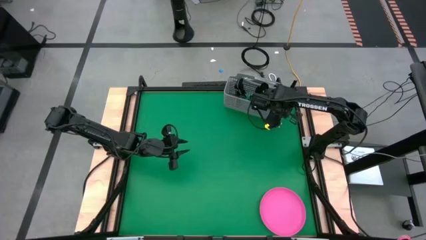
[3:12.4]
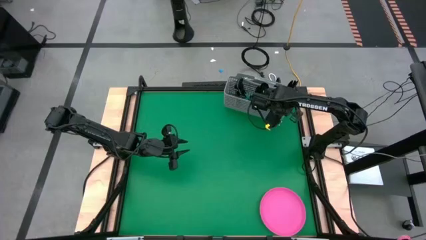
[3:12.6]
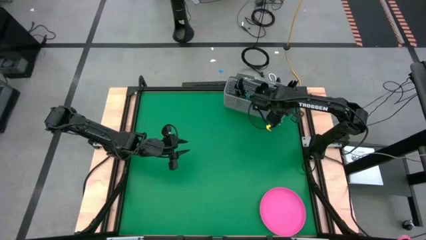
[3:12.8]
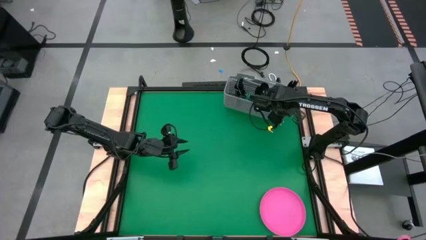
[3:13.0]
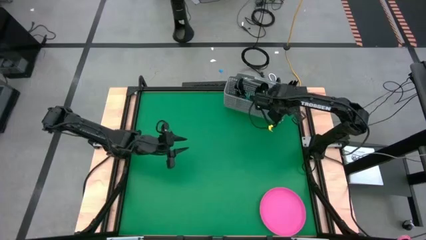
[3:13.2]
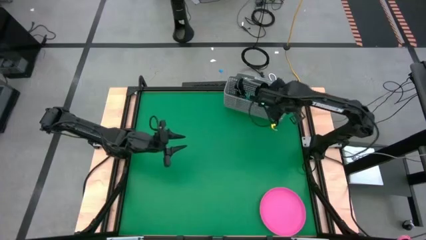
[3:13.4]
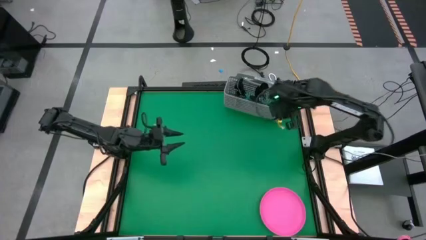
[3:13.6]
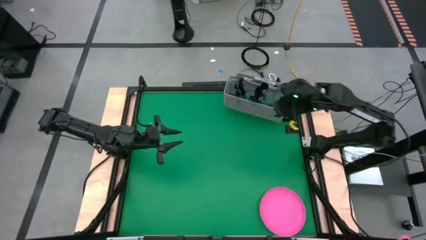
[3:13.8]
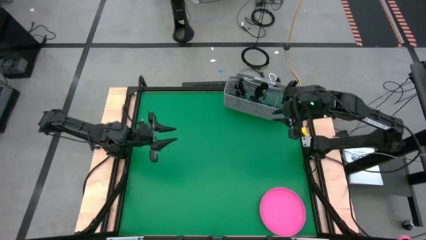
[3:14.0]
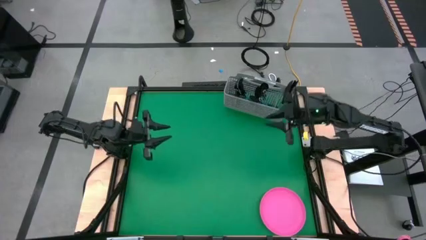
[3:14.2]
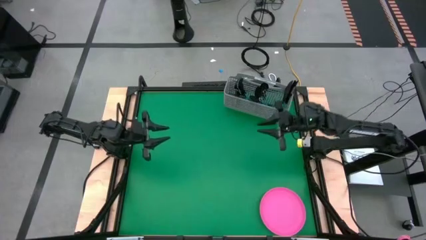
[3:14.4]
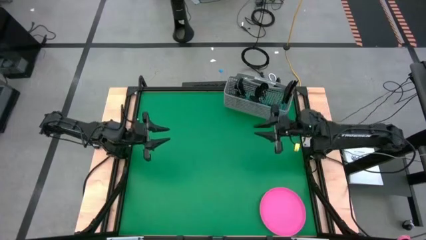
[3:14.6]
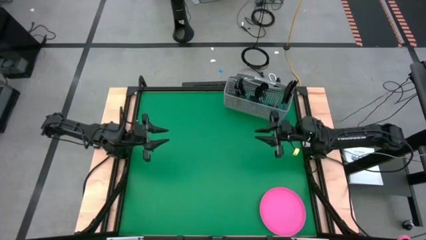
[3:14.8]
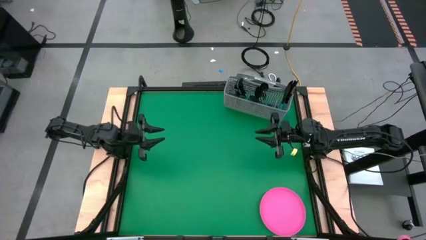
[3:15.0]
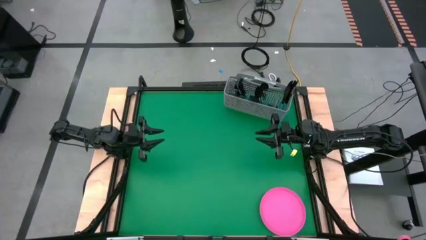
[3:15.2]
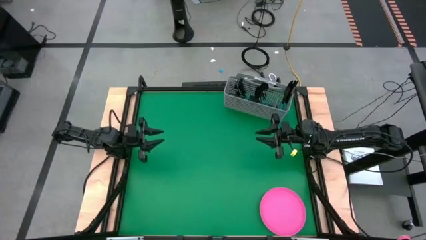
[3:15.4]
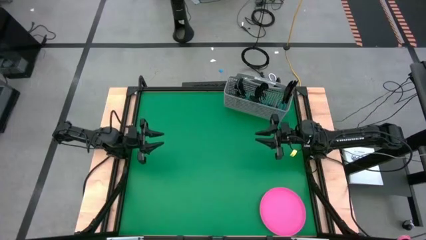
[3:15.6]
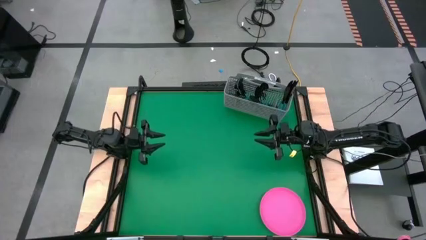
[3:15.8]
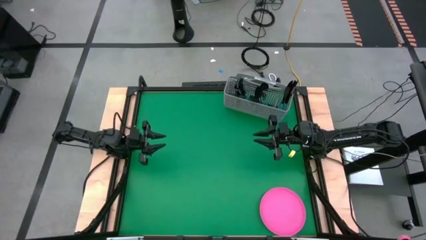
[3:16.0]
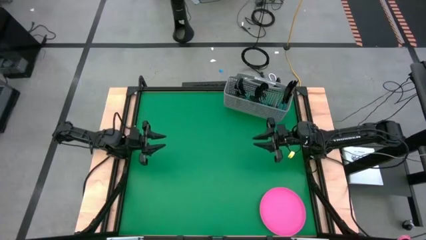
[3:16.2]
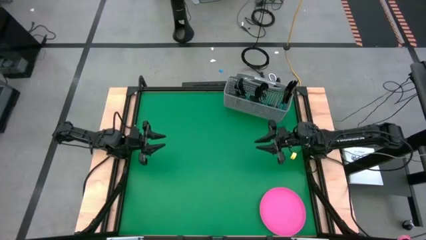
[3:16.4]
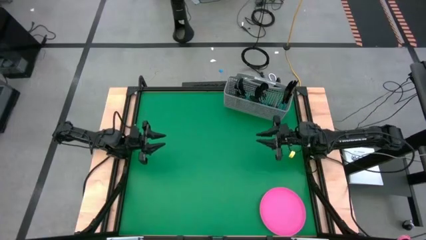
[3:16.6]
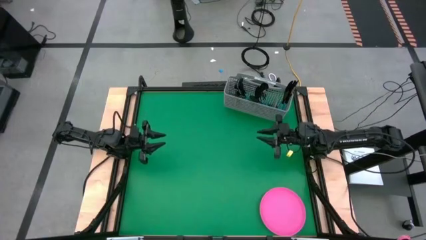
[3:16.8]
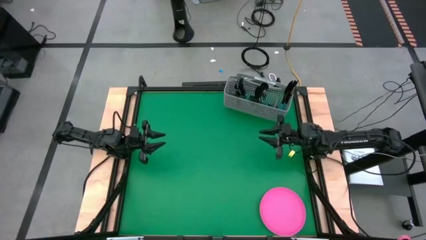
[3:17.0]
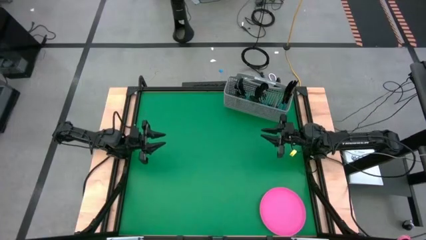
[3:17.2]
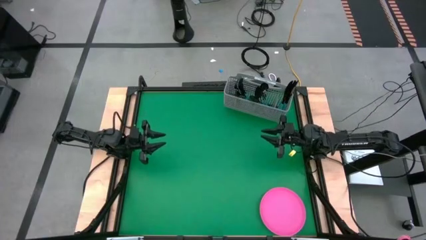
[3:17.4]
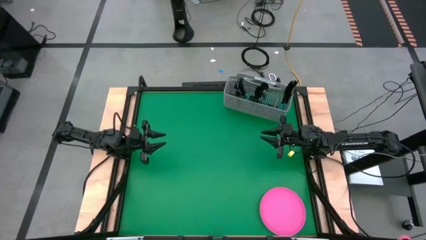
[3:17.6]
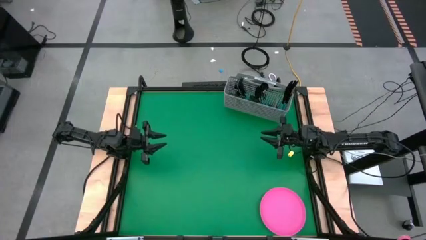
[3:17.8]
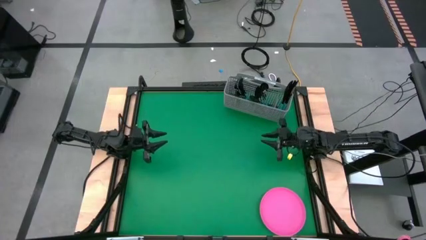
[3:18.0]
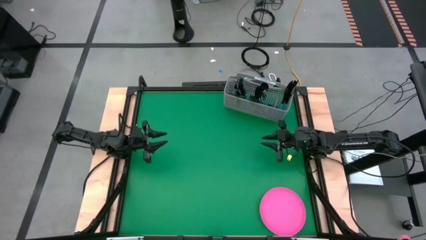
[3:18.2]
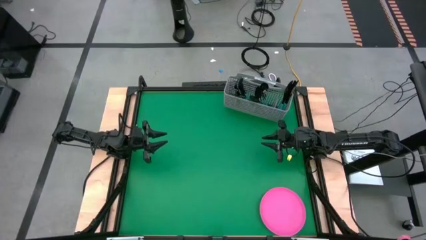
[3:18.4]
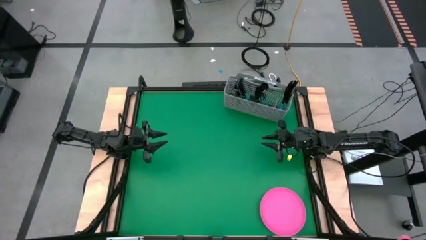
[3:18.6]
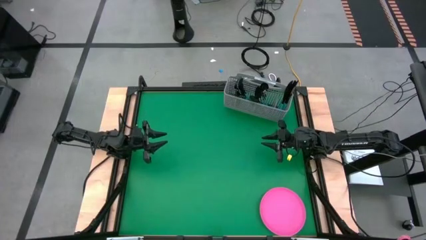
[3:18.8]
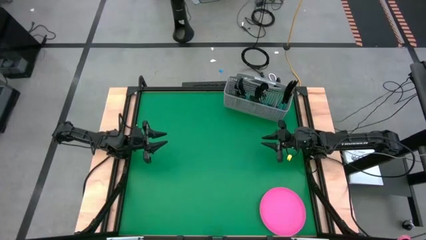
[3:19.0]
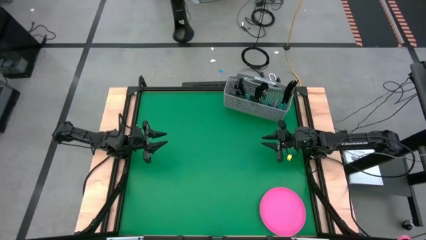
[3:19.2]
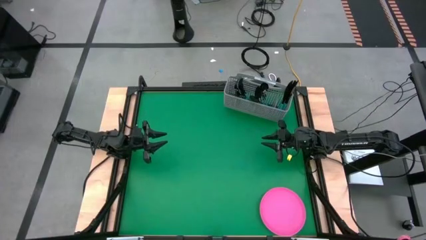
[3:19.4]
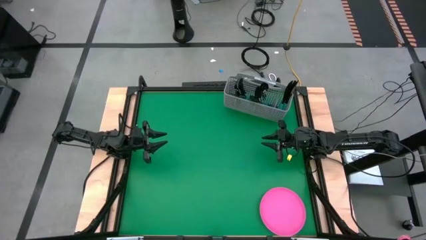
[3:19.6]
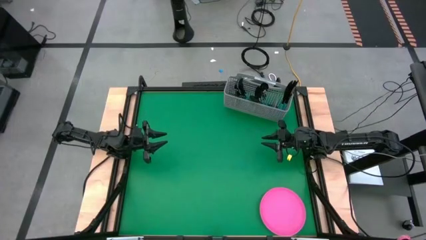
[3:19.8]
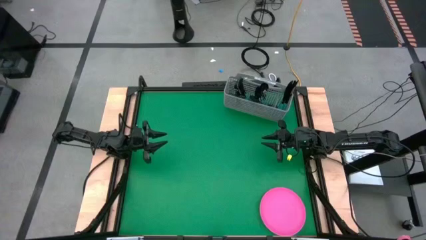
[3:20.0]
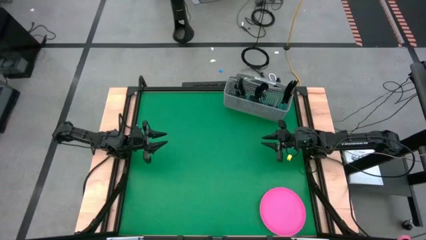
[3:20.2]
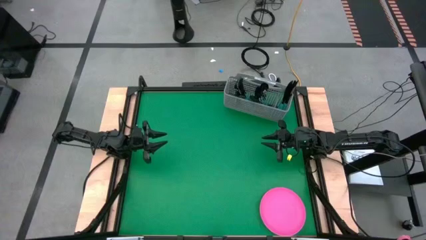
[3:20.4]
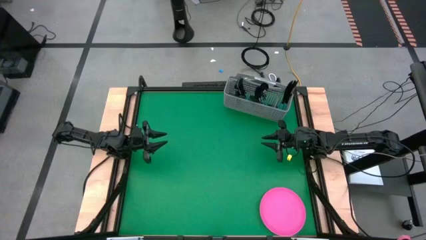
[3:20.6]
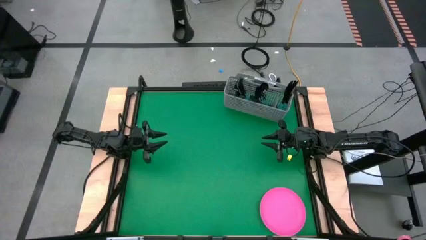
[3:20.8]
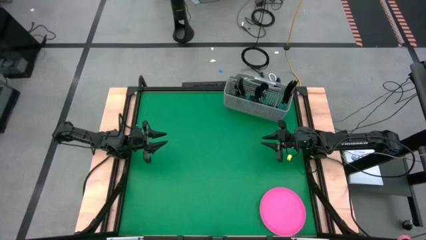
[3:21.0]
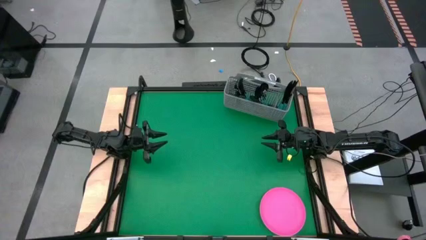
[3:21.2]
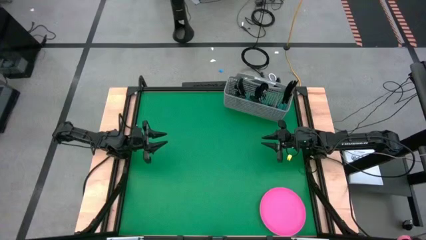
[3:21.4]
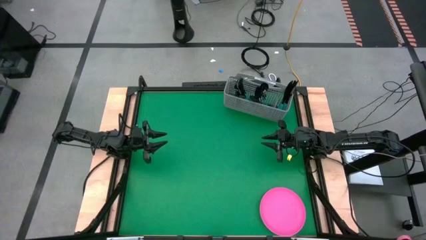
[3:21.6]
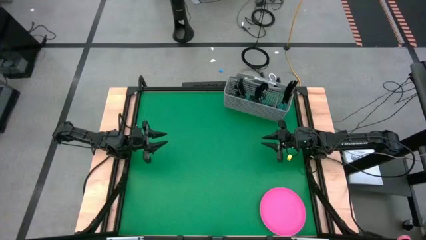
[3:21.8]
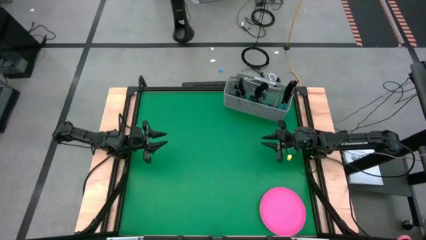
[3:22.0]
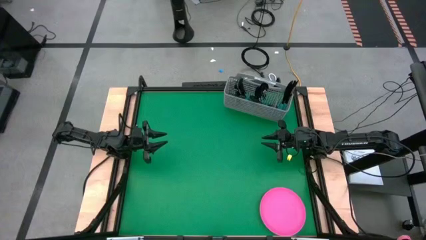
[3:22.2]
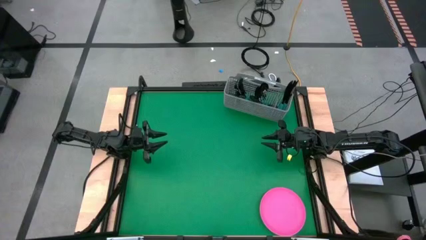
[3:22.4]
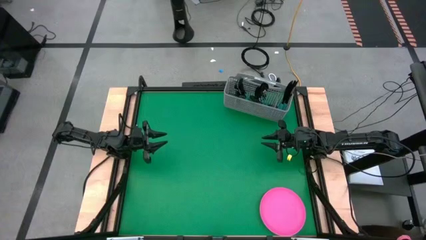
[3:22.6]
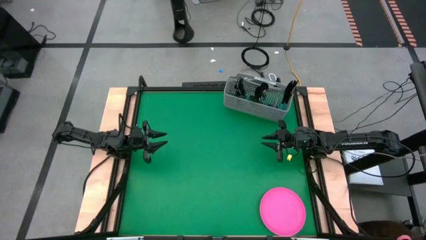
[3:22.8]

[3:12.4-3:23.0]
Task: Sort silverware
Return to Home Position

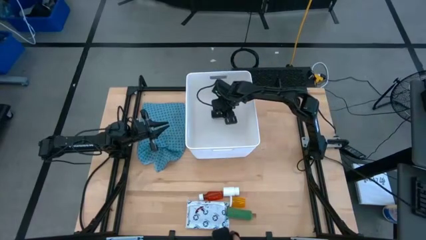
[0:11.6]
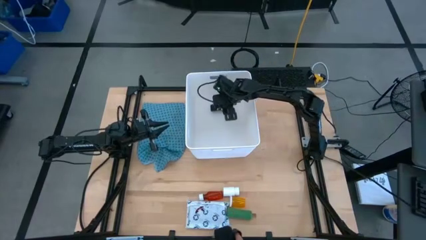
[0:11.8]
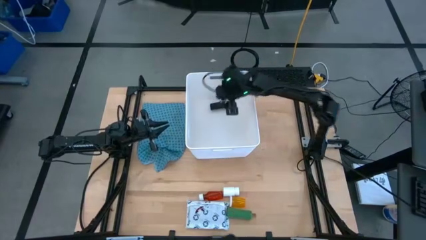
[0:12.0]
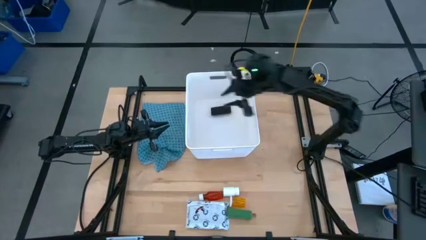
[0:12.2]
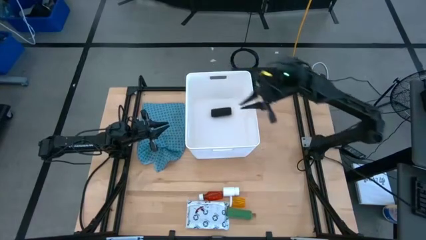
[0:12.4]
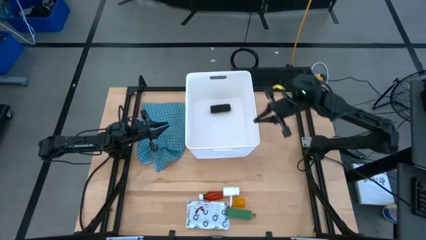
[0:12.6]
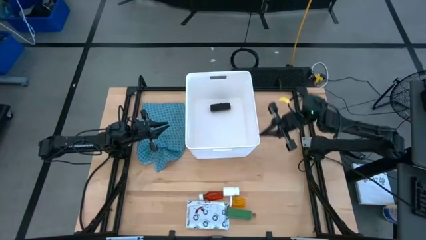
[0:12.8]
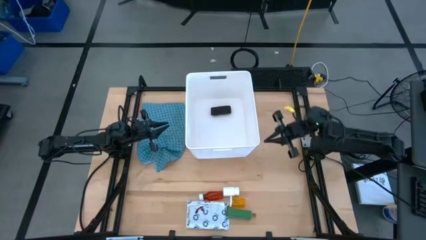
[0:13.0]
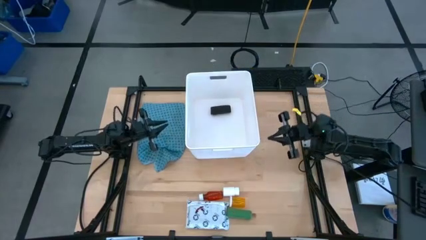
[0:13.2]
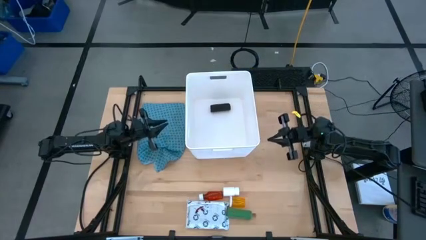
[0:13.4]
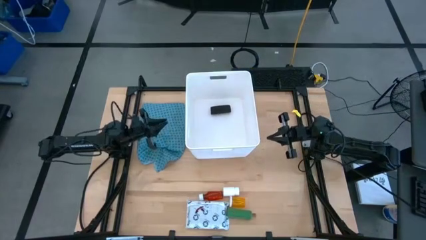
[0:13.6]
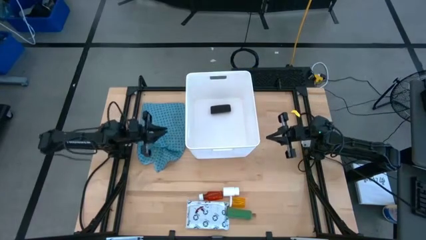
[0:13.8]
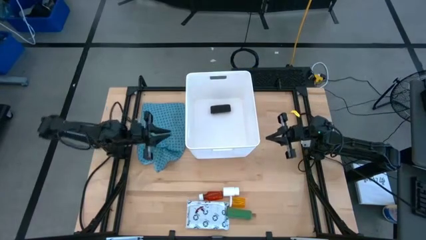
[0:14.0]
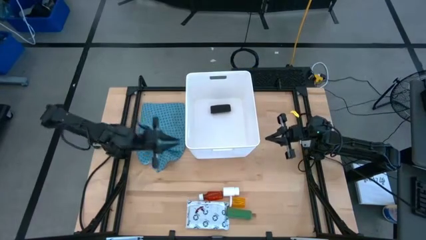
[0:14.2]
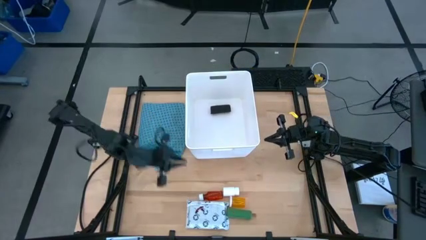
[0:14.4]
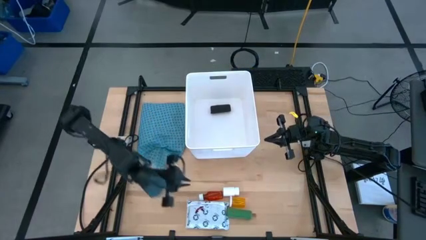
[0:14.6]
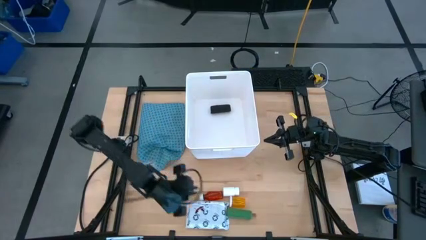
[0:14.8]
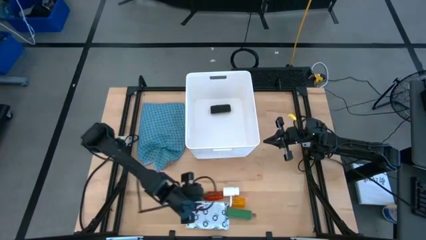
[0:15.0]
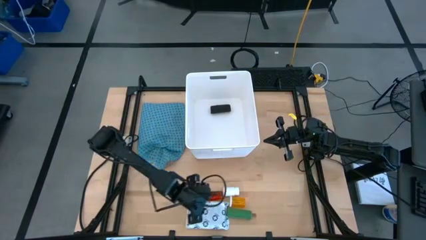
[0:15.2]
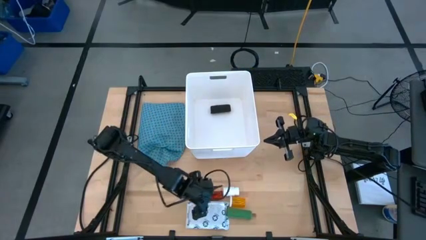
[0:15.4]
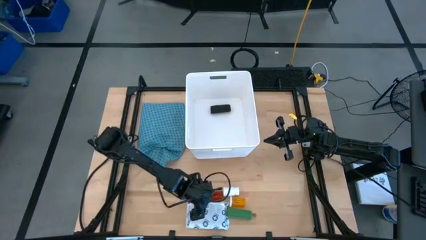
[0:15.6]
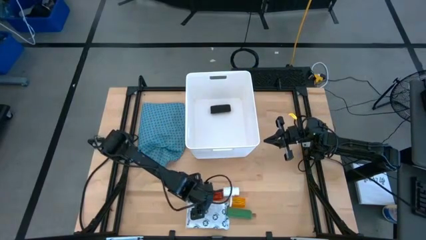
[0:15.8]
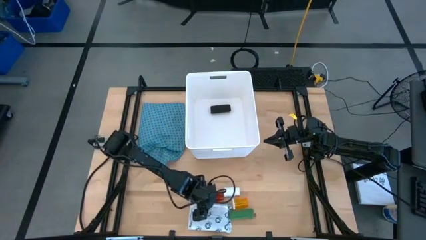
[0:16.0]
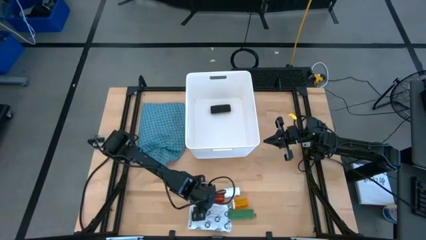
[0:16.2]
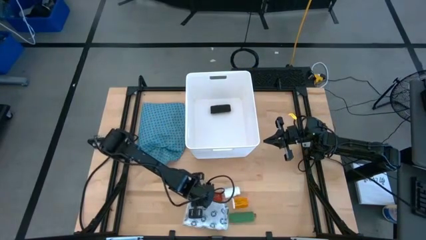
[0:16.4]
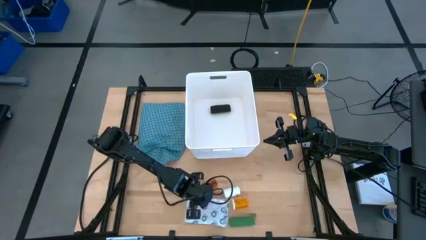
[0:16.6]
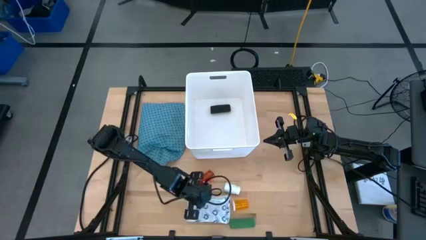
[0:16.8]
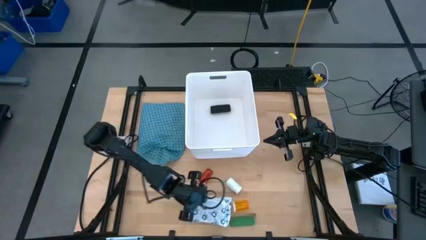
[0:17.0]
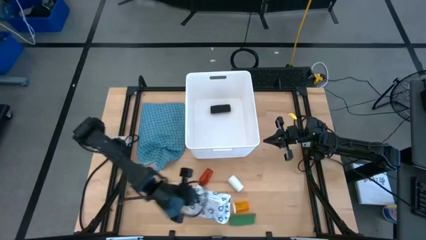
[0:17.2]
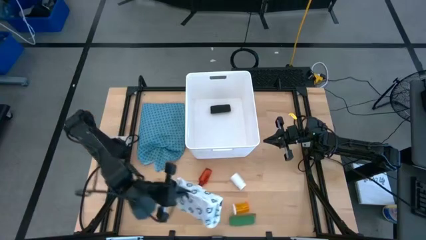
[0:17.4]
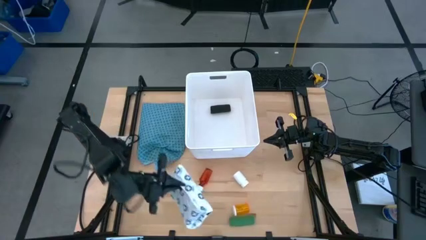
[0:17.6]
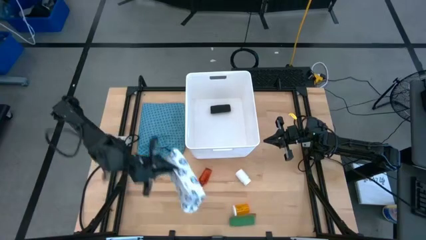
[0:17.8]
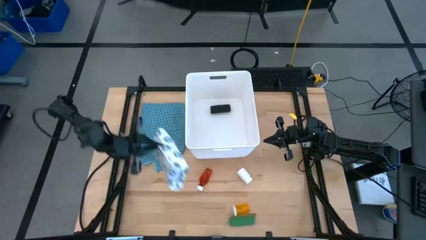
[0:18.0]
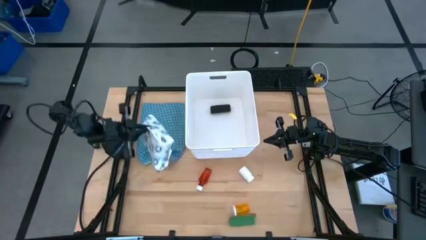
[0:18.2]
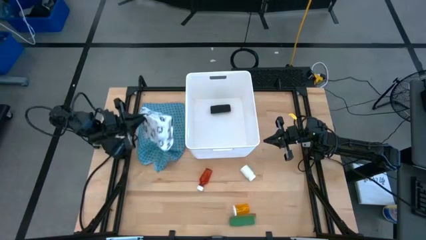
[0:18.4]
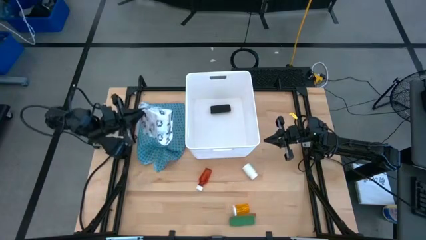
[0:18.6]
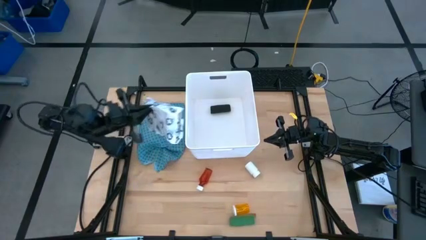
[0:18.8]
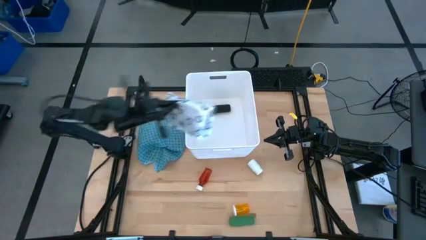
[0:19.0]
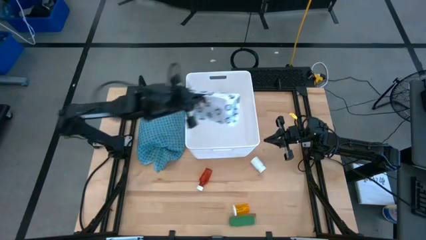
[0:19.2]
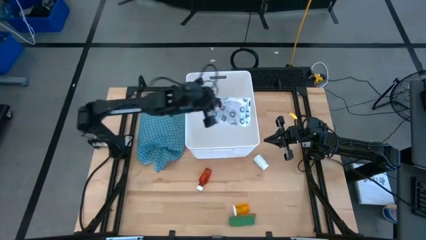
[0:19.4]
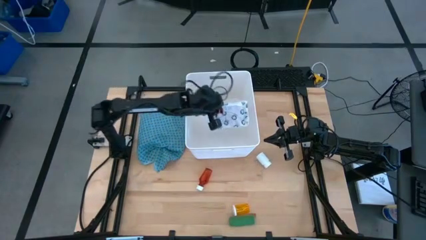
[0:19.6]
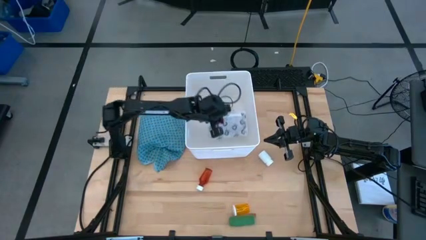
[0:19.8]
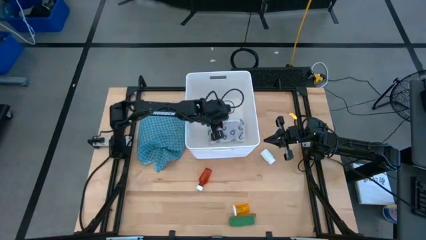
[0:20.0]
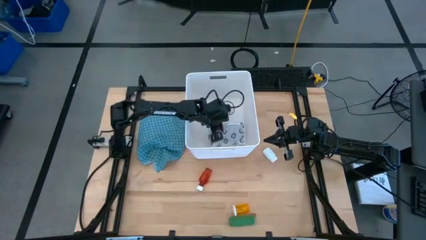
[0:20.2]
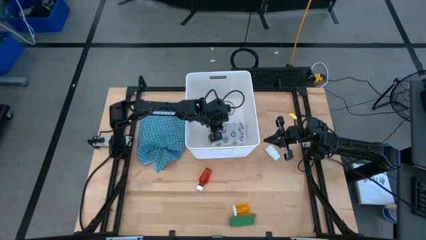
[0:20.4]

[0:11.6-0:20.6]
Task: Pick & place medical supplies in basket/bin
Put the white mailer bag into the white bin
